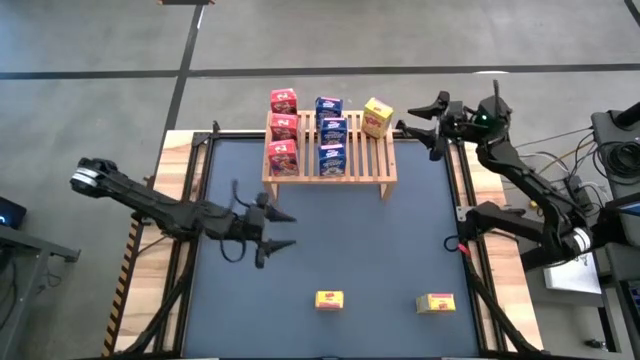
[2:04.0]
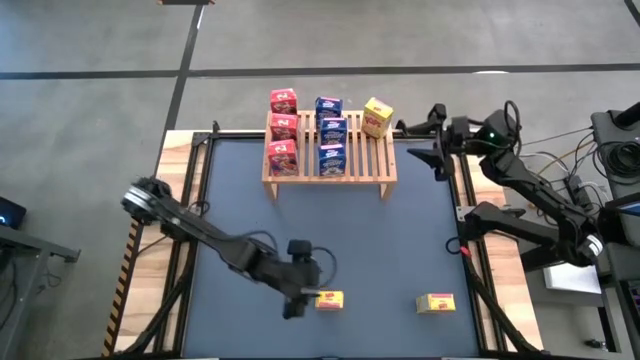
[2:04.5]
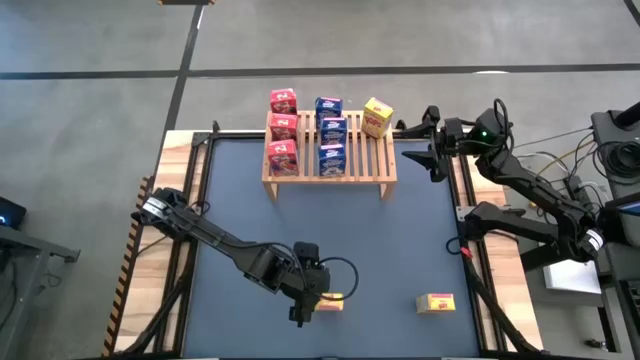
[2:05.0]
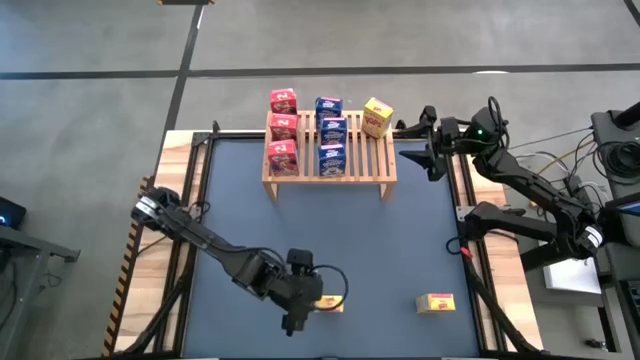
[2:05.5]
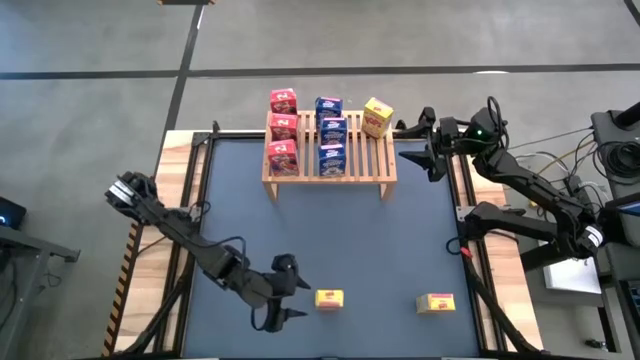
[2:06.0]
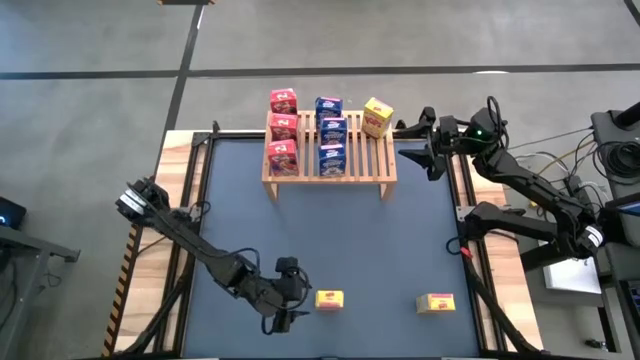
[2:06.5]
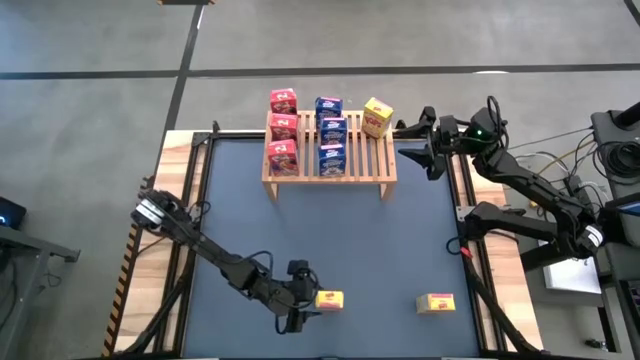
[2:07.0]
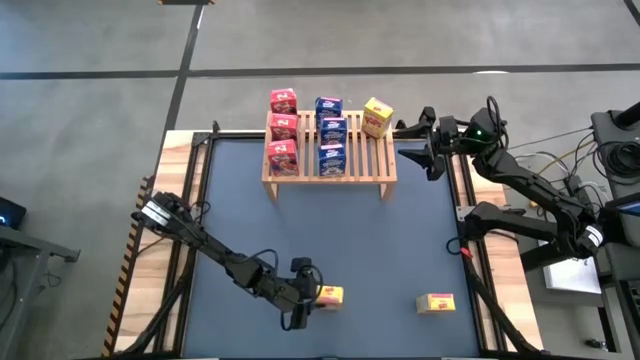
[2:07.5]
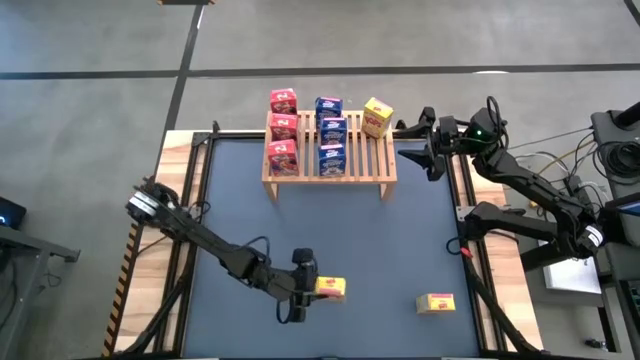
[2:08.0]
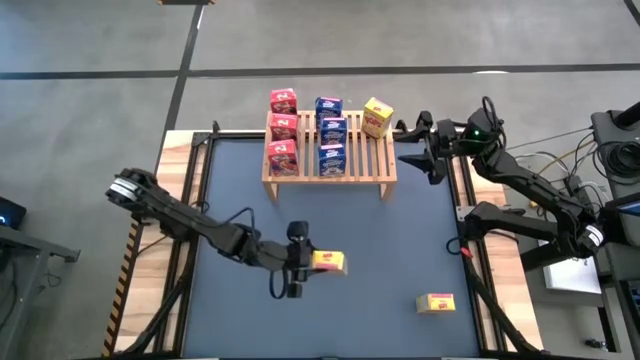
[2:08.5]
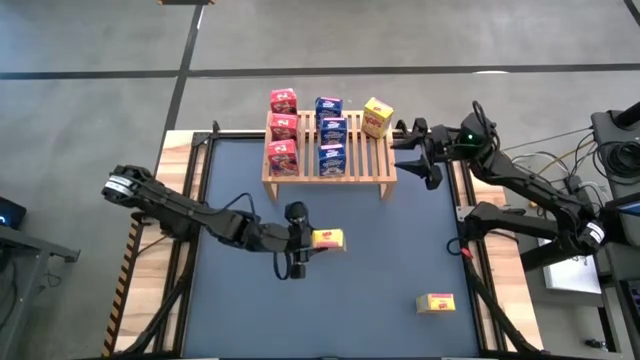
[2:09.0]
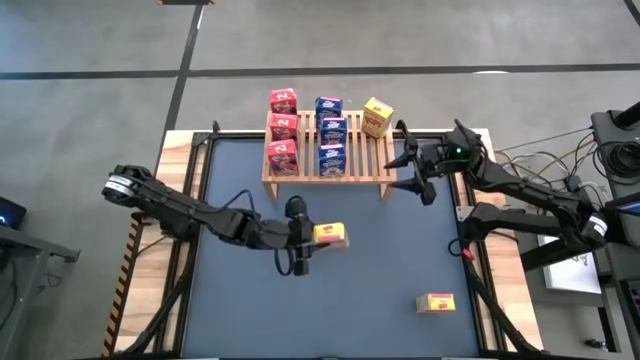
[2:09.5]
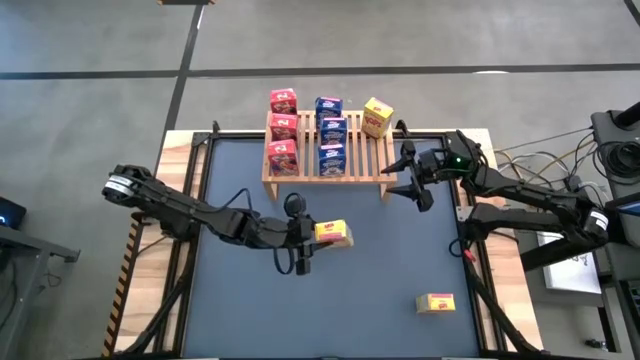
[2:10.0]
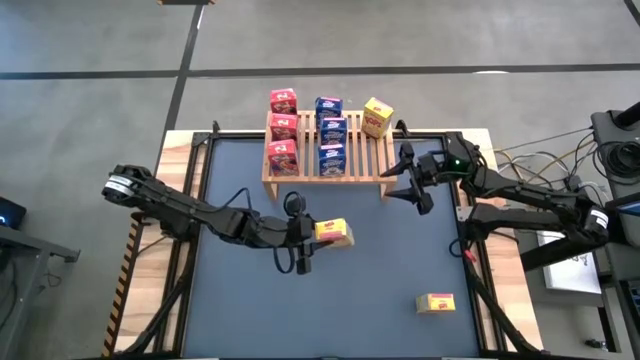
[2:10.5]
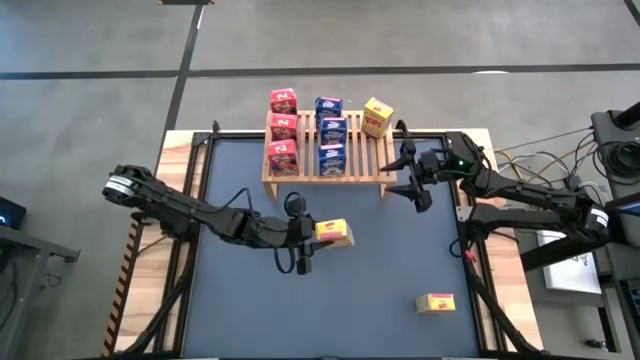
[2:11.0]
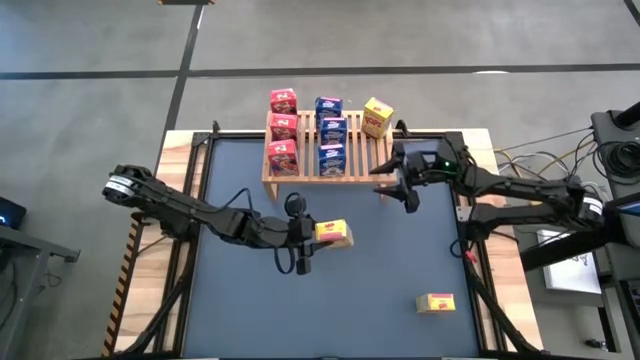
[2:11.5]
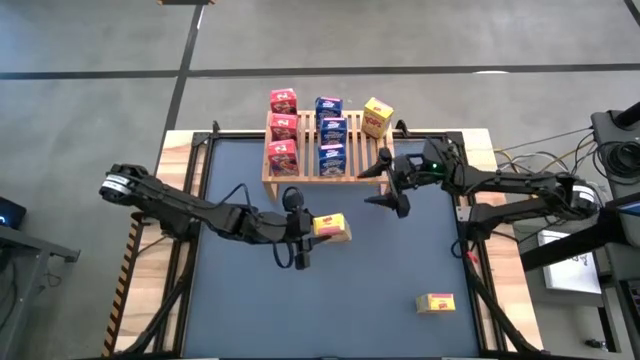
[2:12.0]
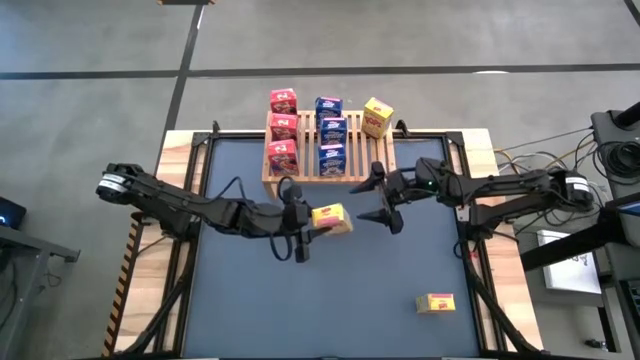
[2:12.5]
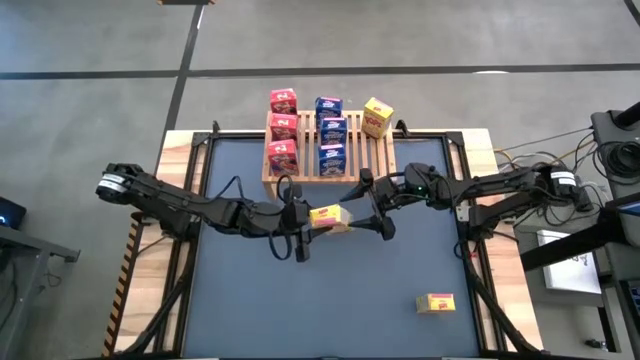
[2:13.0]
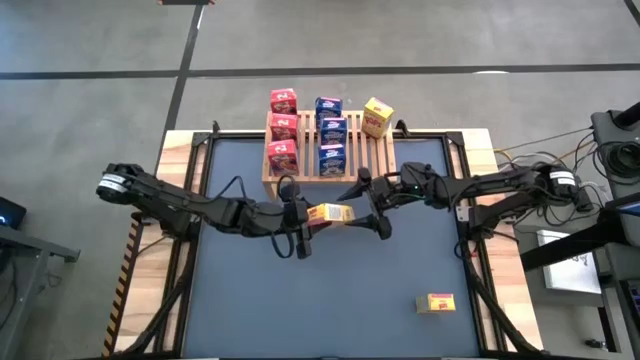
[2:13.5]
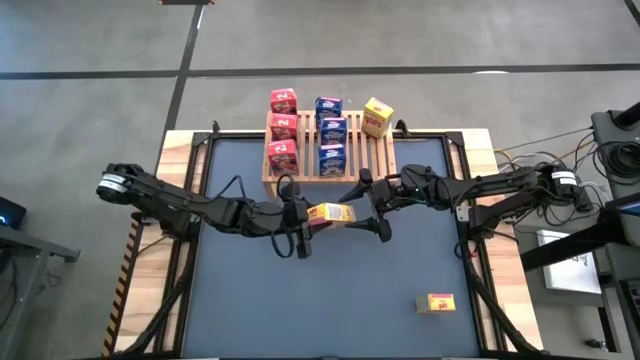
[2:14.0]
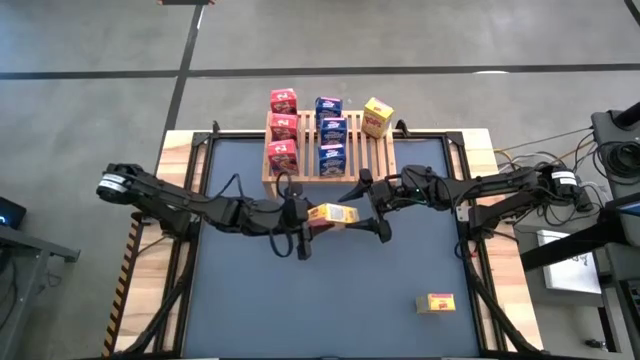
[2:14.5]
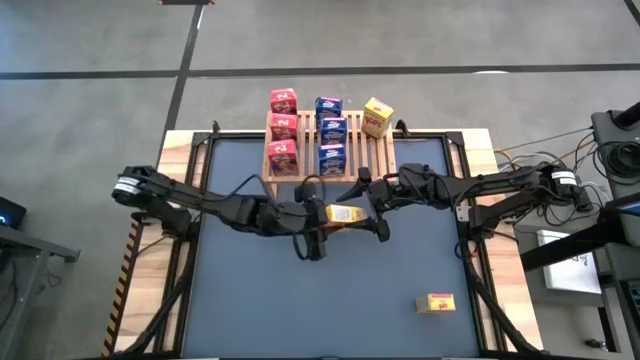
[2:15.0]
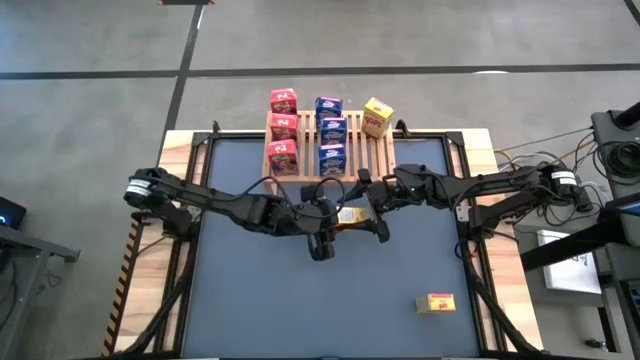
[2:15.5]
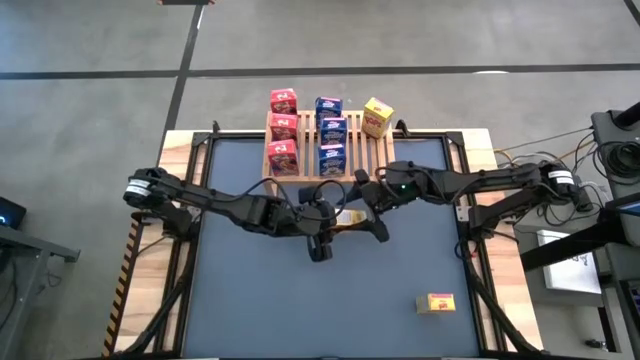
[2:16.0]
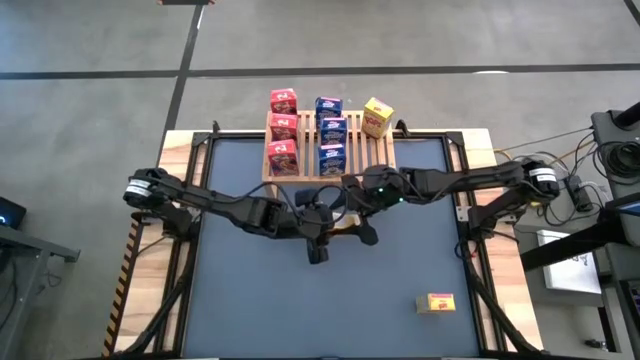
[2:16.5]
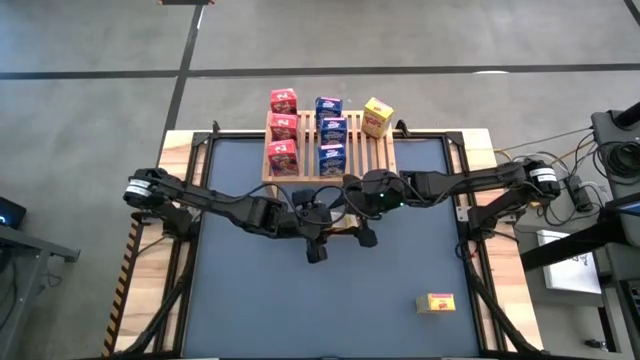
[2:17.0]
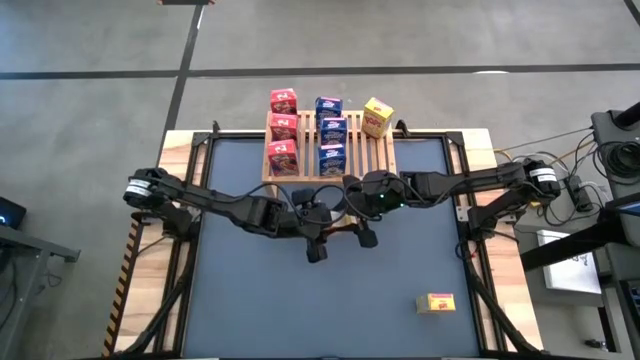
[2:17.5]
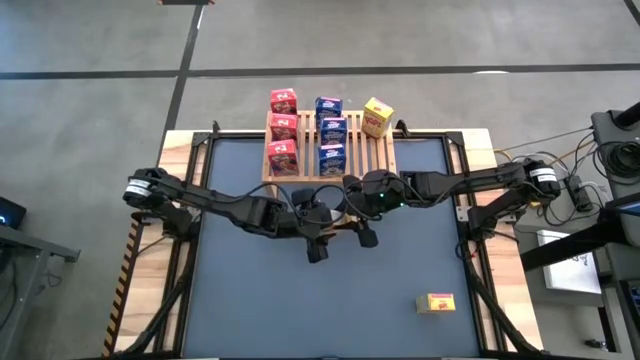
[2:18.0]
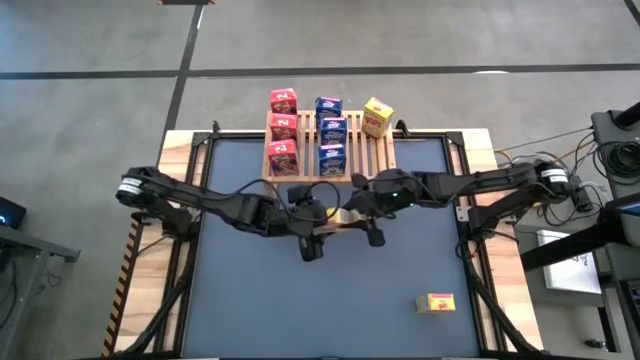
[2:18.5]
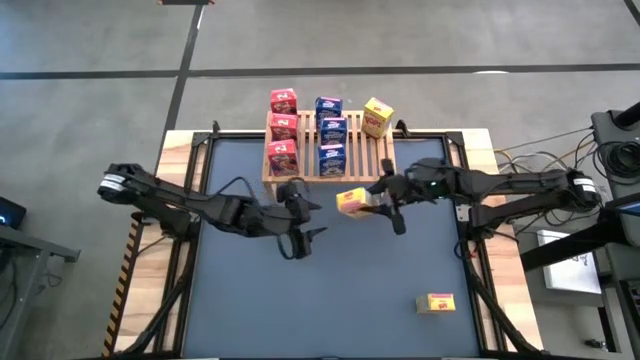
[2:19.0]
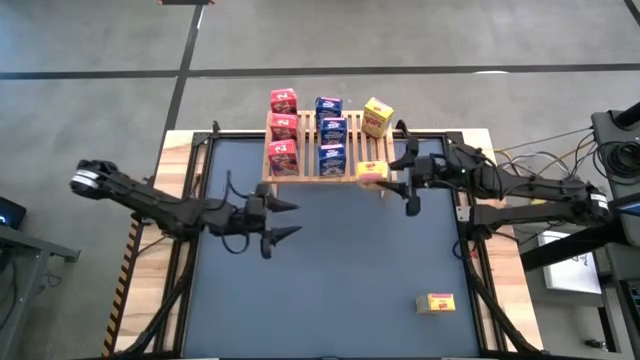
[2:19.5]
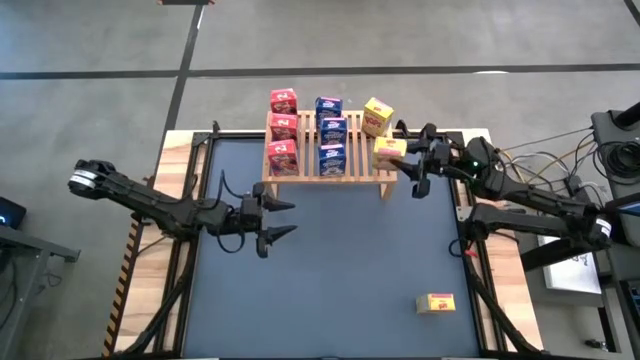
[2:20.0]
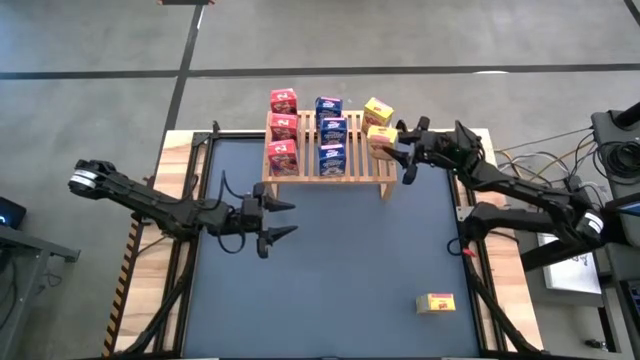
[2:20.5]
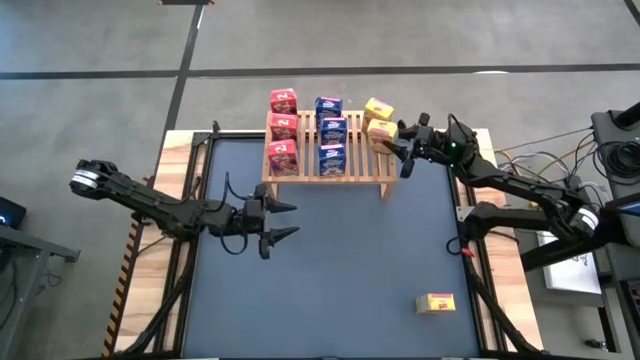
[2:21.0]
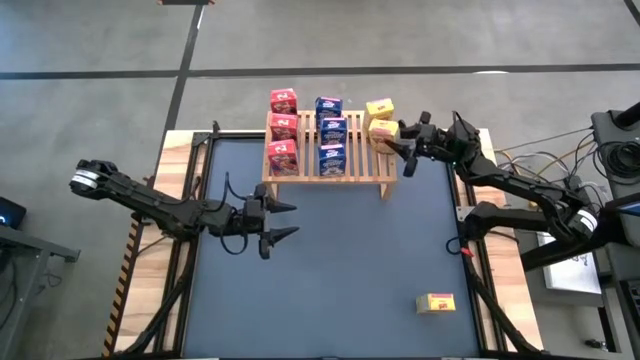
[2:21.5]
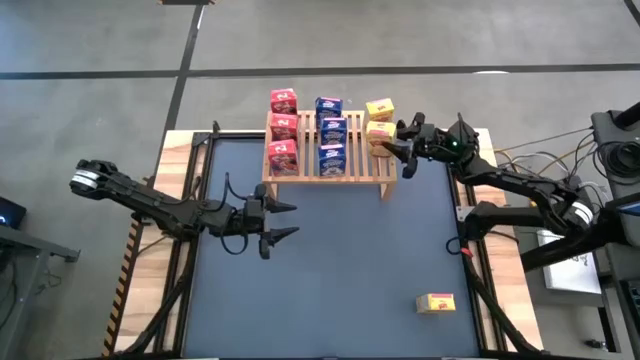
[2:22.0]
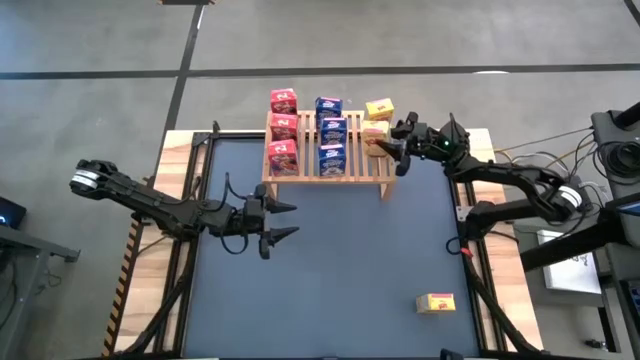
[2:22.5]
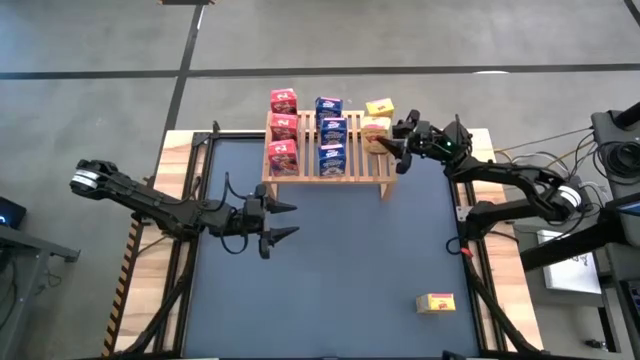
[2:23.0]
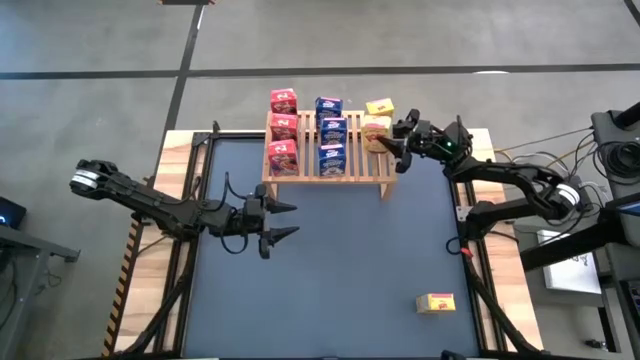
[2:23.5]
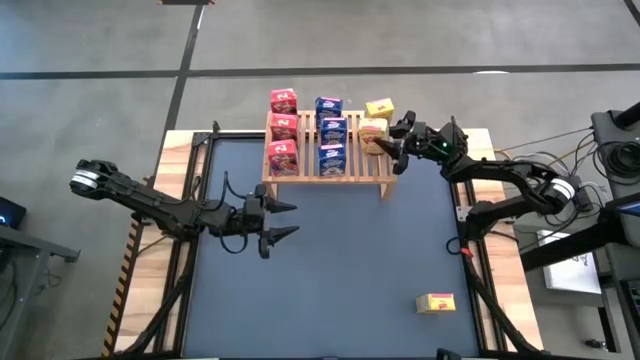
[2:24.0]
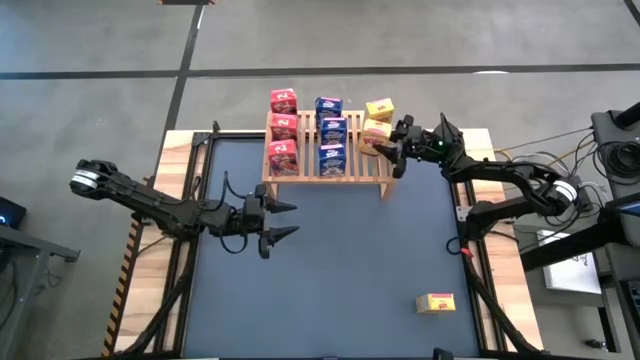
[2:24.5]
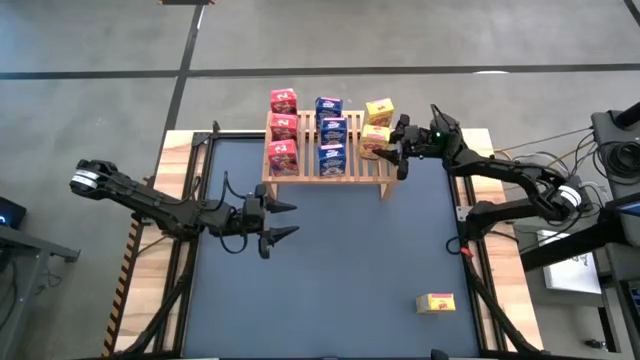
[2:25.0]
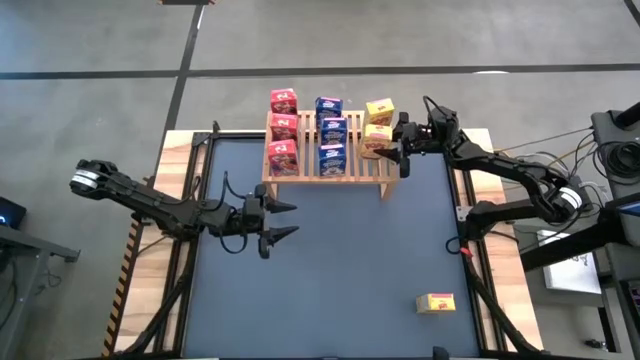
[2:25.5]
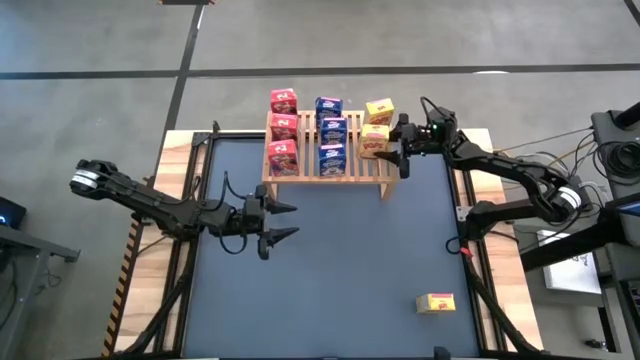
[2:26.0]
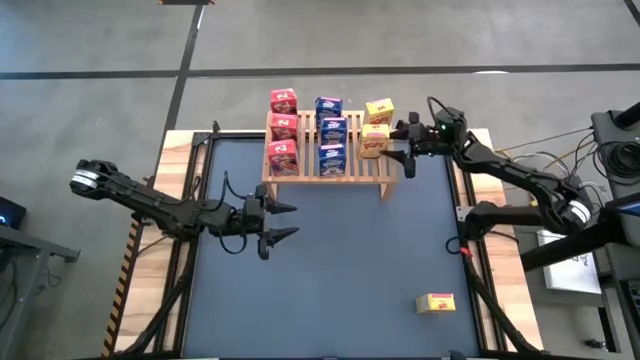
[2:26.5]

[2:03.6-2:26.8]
Task: Stack cereal on shelf
Put the left yellow cereal box aligned with the other yellow cereal box on the shelf
